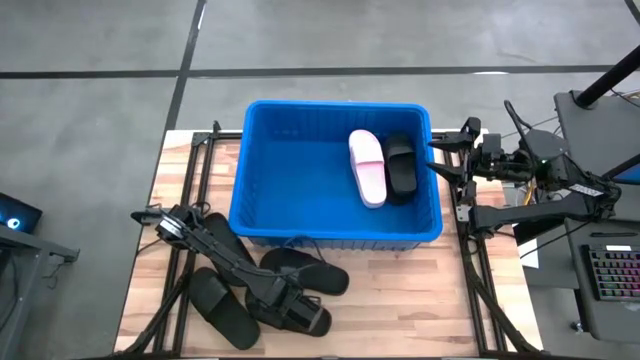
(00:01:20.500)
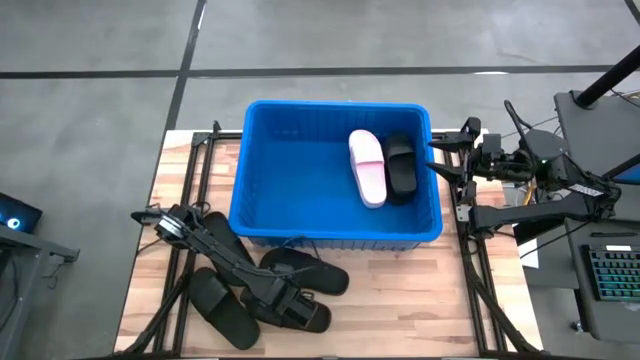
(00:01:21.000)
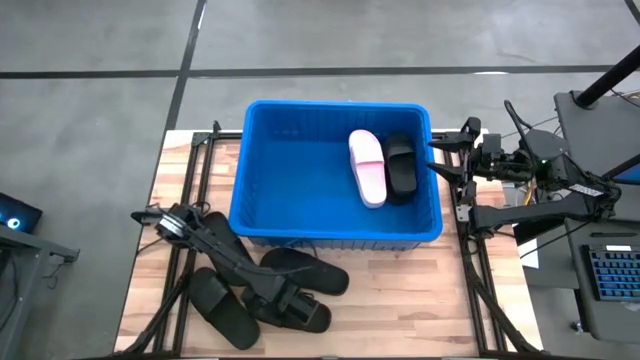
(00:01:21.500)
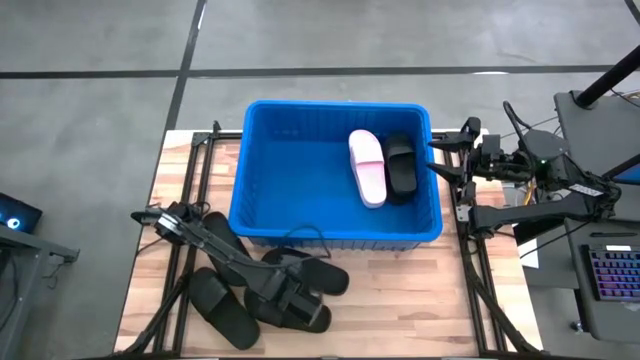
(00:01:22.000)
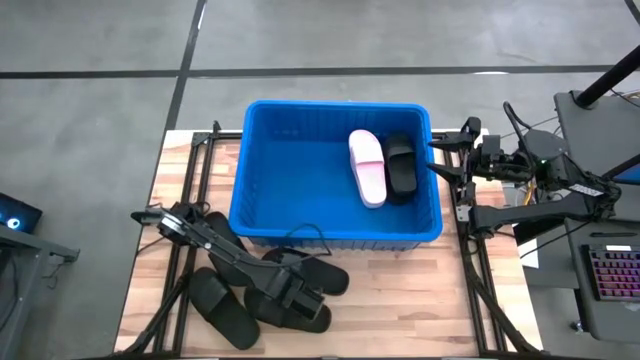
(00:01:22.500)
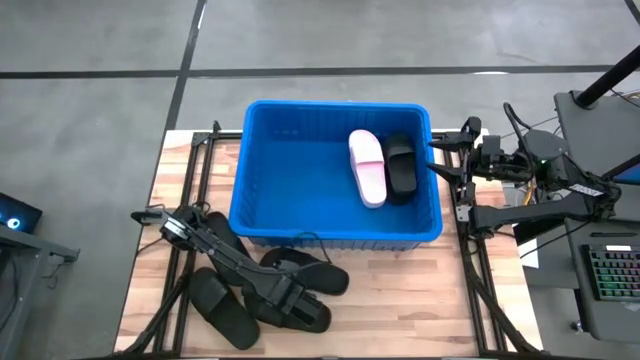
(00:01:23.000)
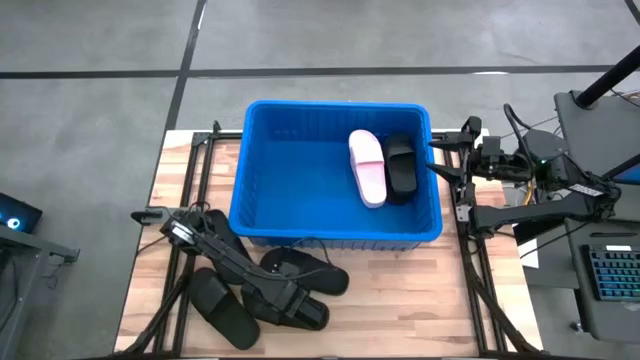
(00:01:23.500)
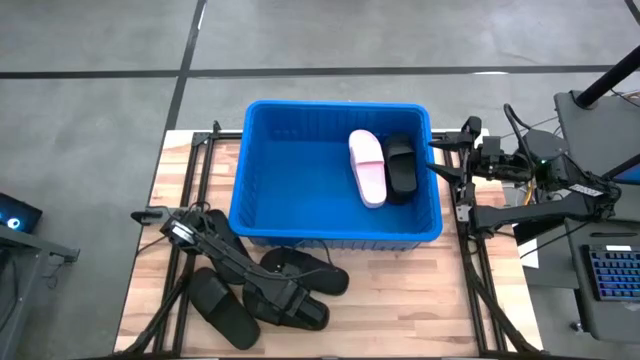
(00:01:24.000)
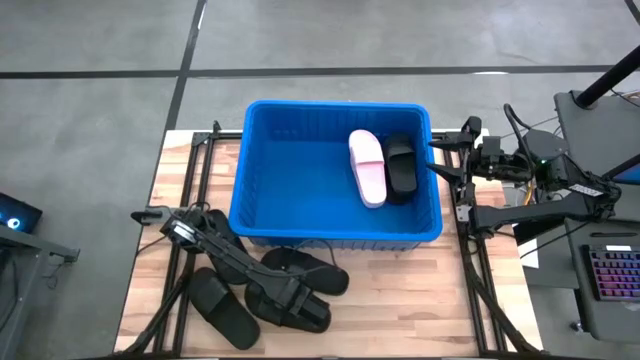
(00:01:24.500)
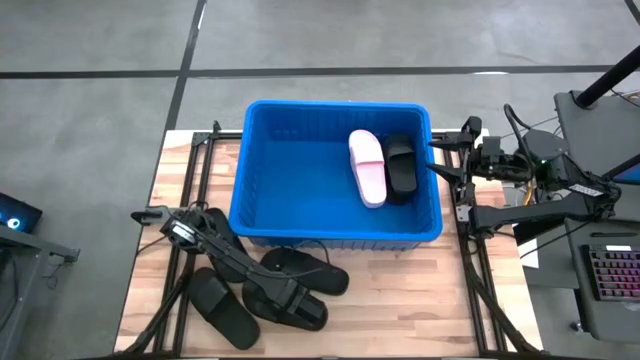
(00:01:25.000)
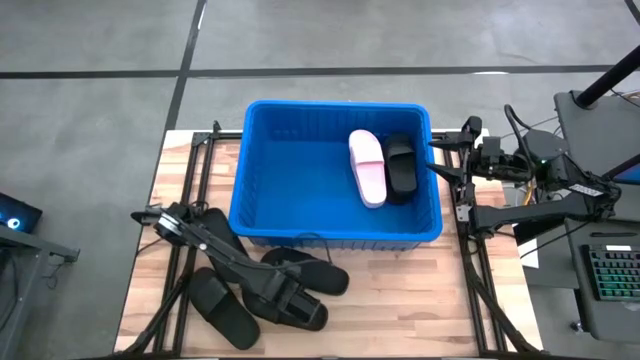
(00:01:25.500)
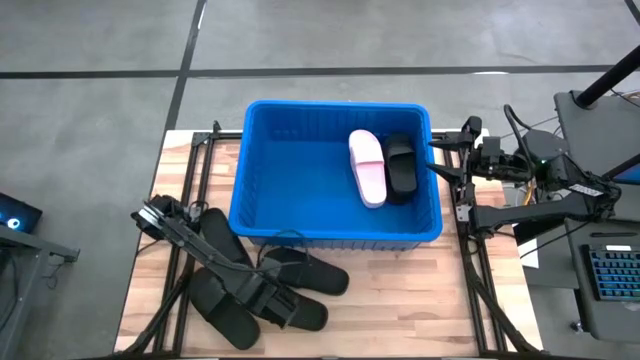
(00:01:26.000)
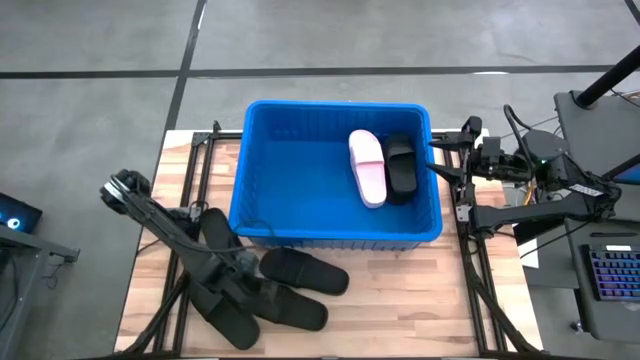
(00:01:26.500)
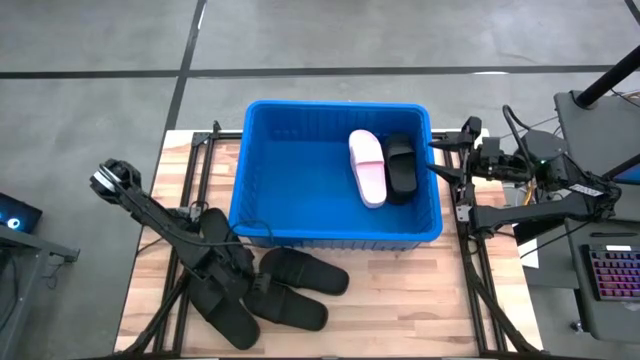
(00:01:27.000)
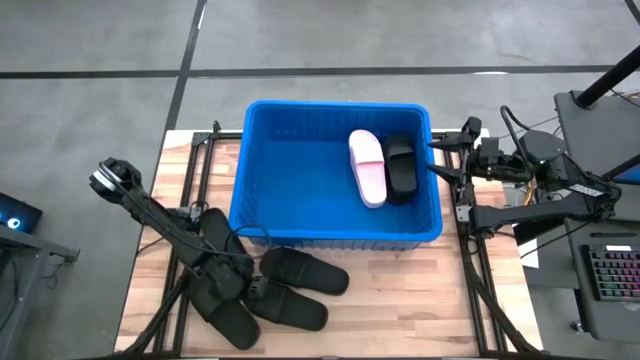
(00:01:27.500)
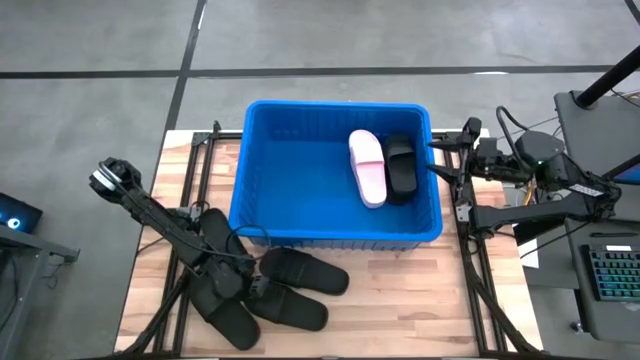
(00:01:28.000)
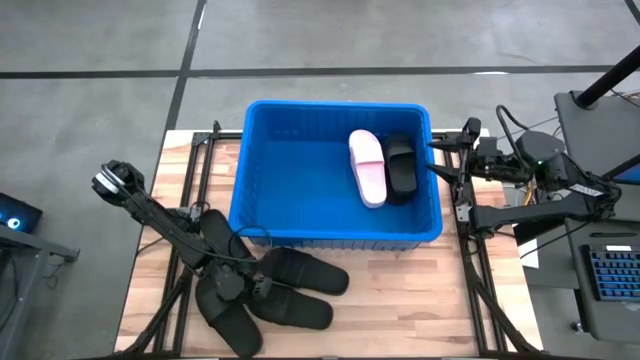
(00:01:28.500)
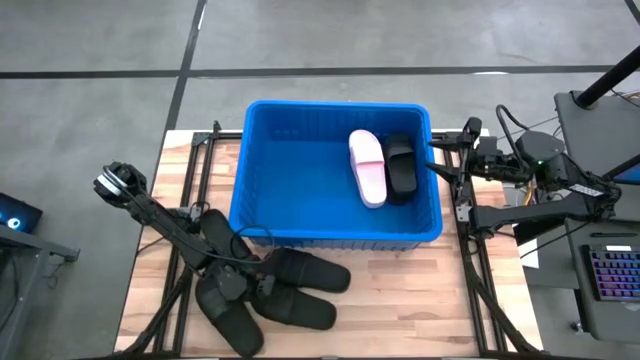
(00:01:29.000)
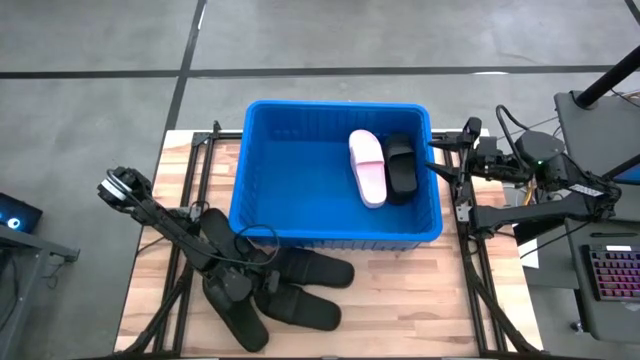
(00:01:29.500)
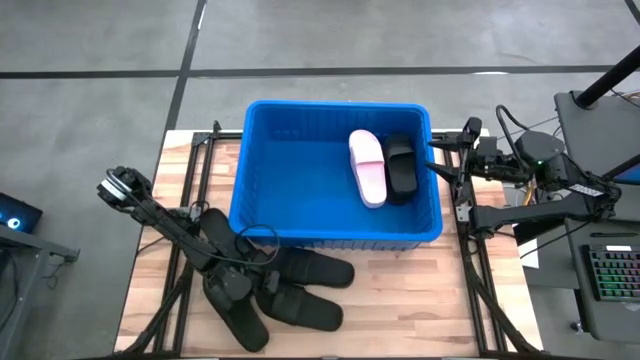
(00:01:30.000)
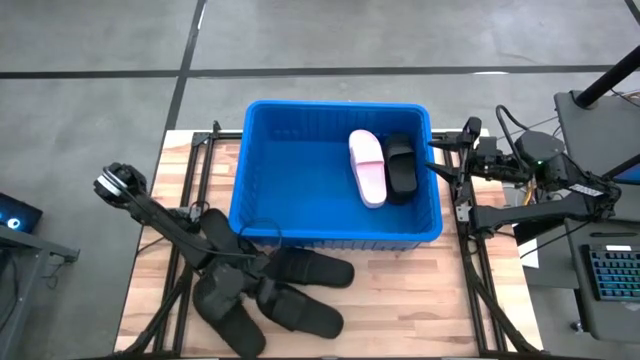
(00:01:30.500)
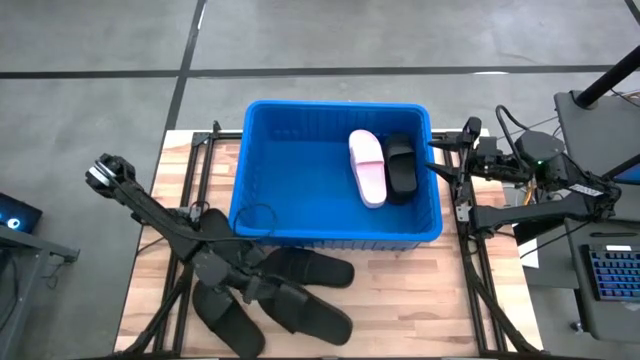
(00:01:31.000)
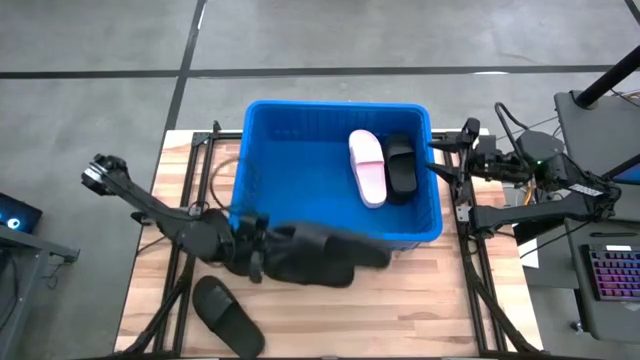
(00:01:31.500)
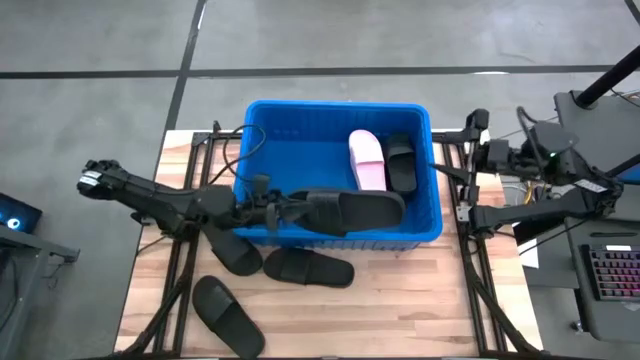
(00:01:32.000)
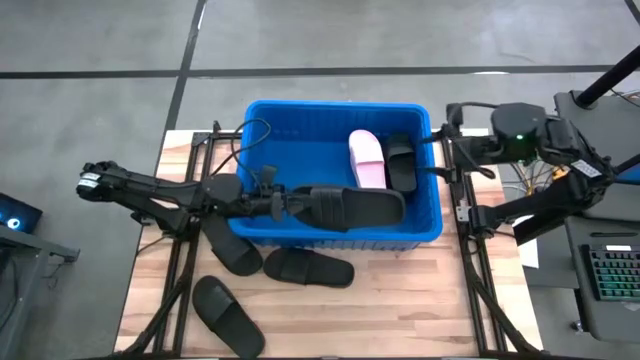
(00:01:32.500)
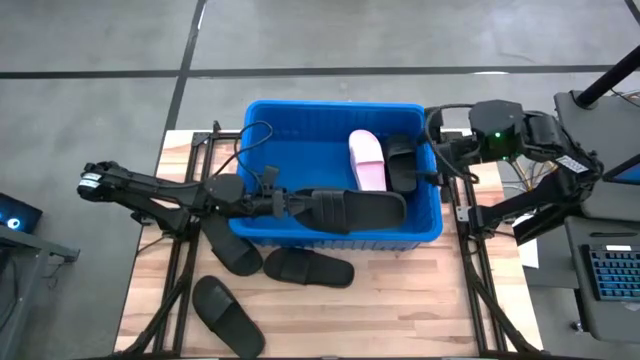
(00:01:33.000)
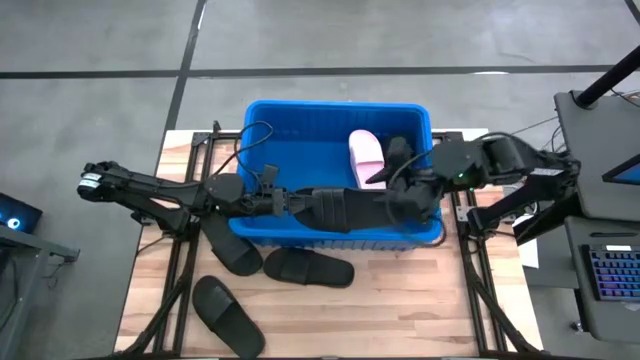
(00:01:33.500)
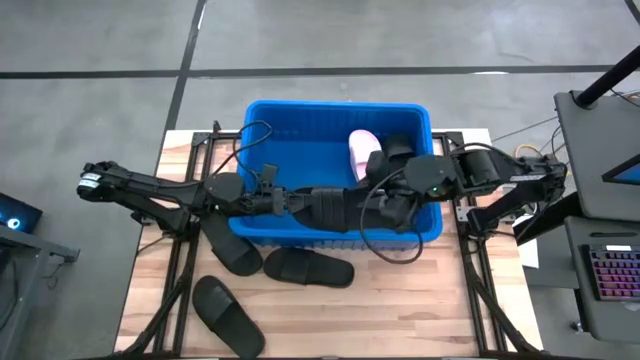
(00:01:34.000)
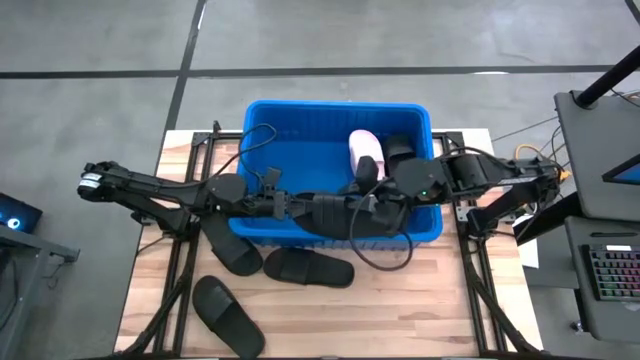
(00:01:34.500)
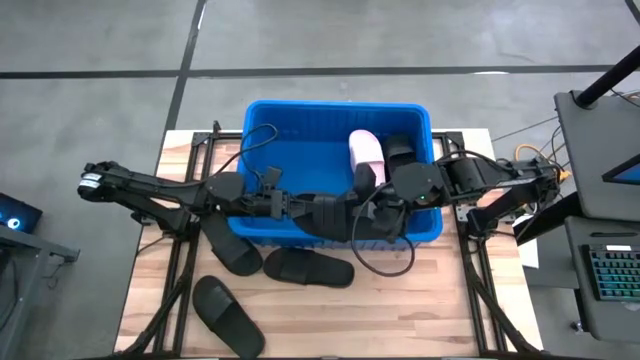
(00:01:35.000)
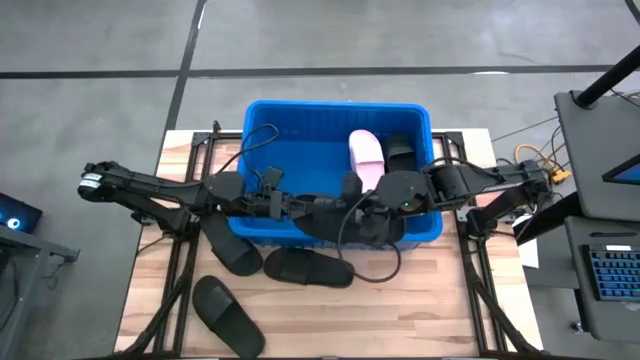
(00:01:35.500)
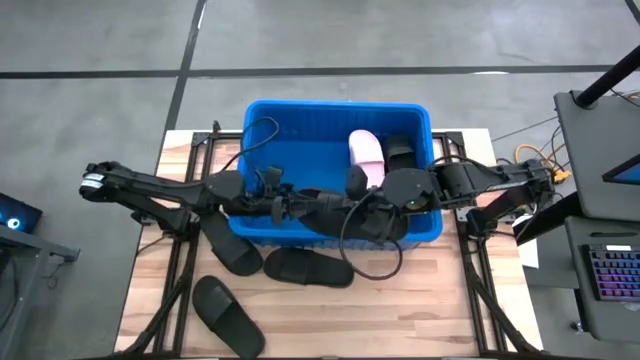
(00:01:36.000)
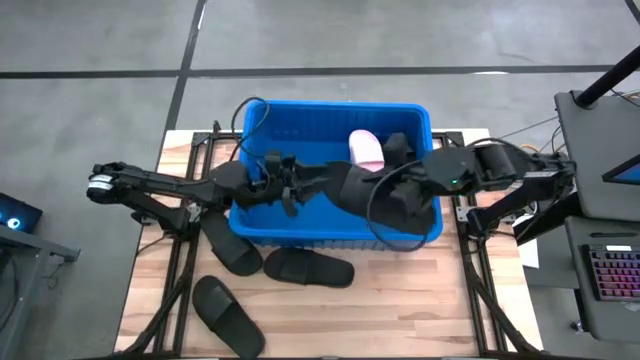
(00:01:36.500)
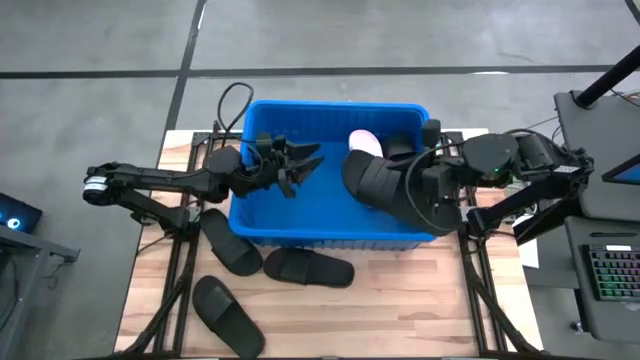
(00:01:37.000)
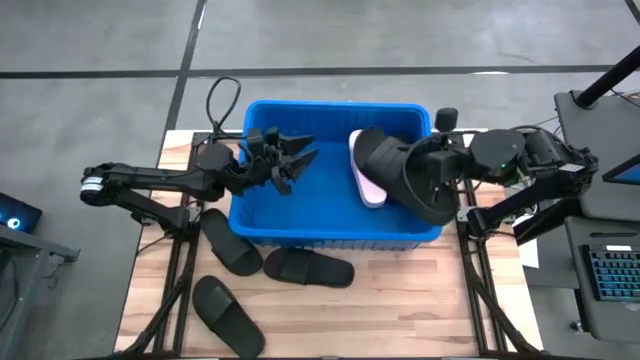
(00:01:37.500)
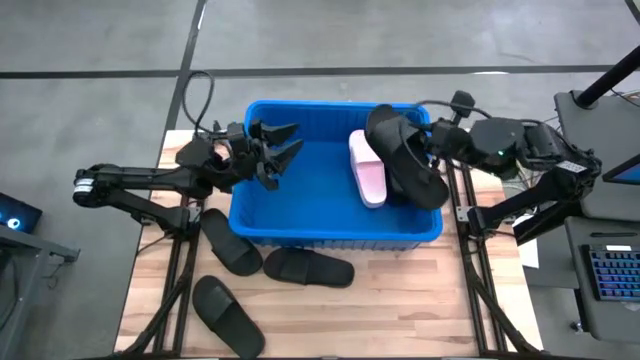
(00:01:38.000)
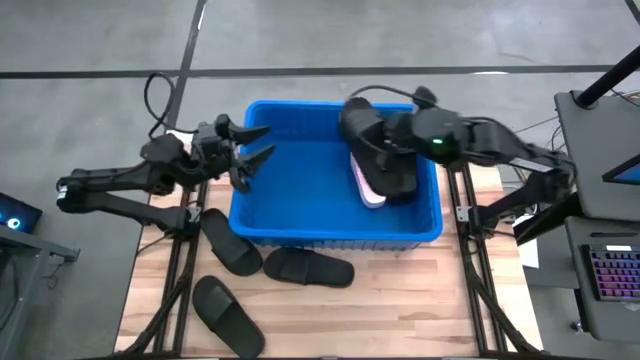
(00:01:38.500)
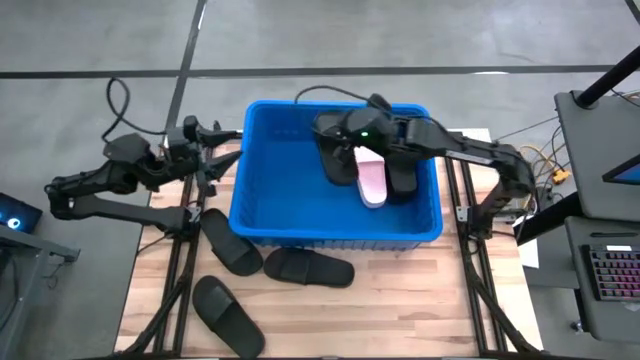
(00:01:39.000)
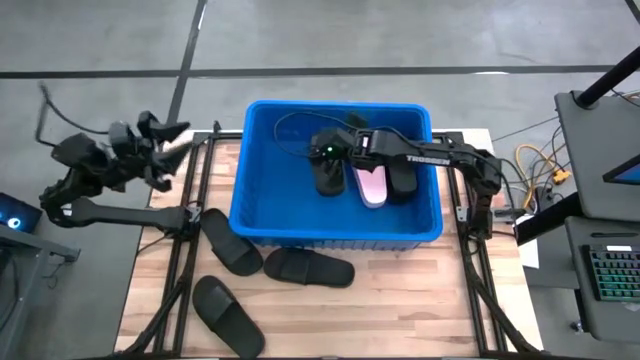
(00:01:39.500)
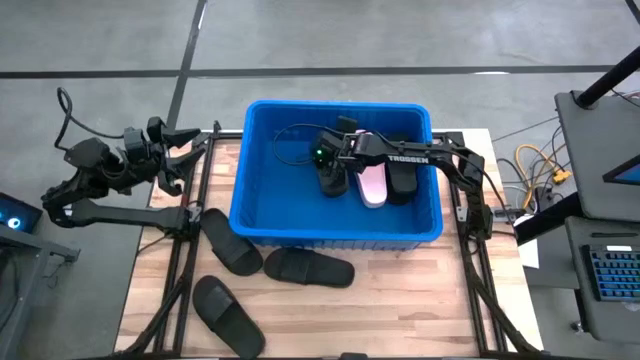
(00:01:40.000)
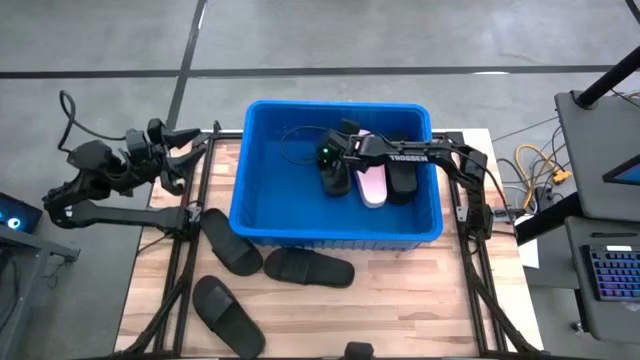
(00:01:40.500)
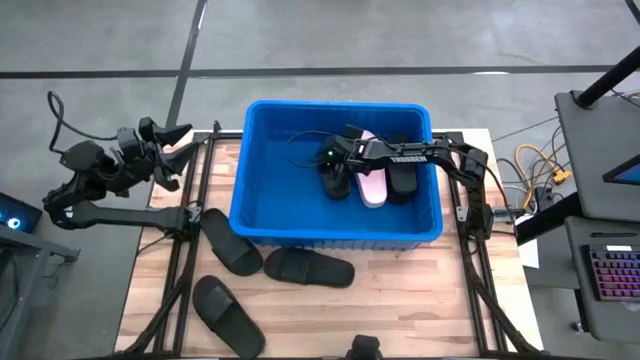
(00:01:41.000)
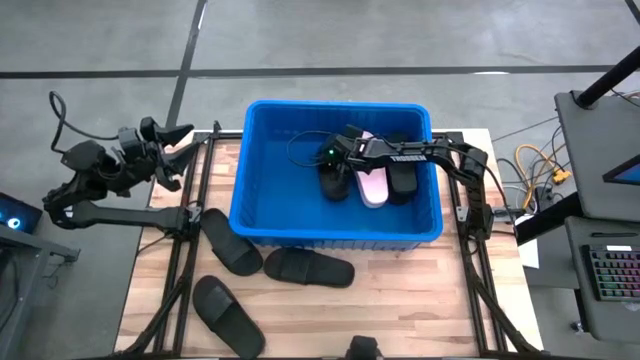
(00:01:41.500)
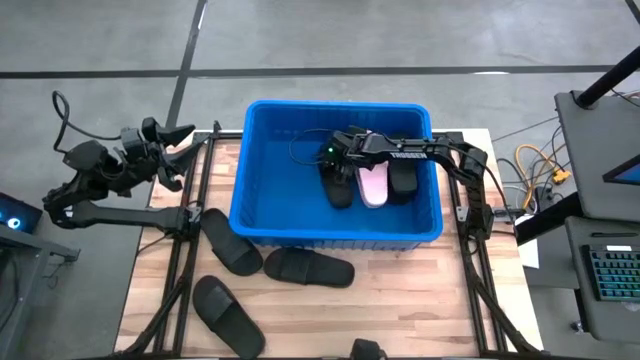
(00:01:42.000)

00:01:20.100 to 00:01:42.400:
Task: Pick and place slides into bin
Put the black slide into the blue container
